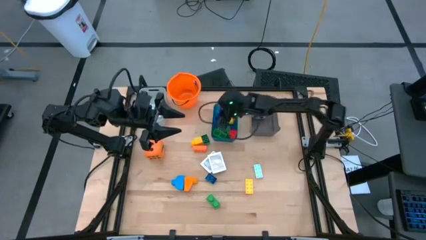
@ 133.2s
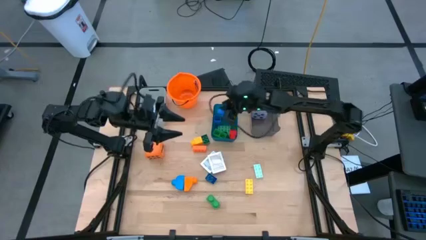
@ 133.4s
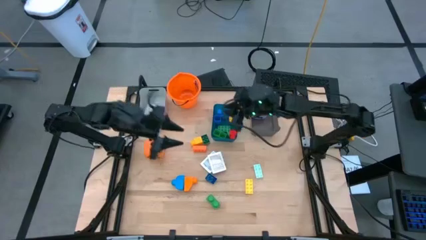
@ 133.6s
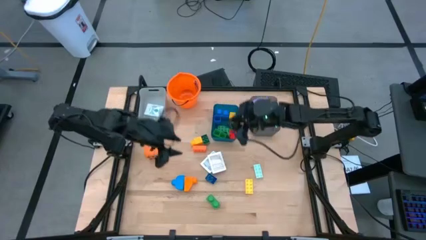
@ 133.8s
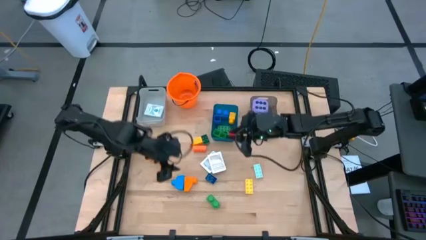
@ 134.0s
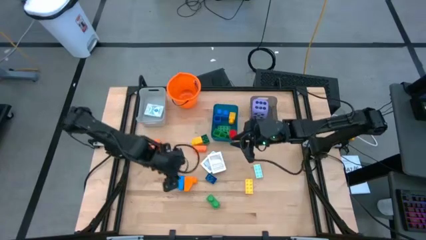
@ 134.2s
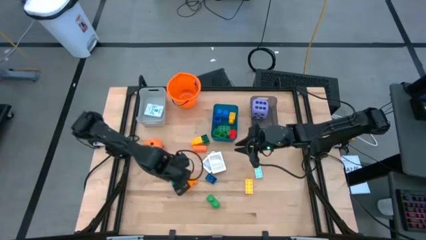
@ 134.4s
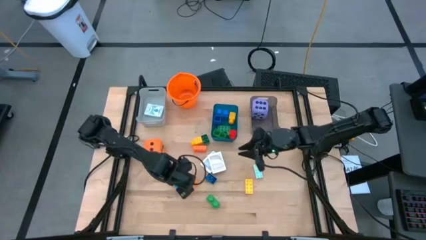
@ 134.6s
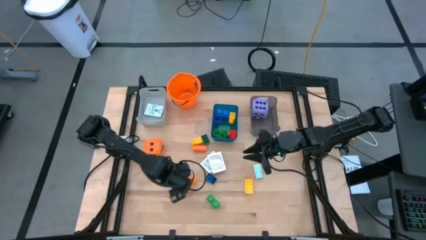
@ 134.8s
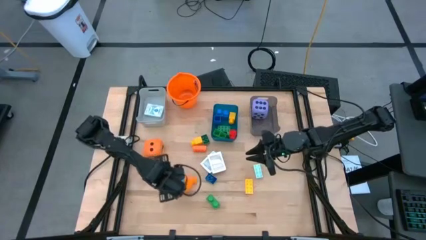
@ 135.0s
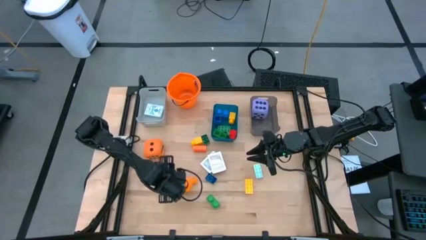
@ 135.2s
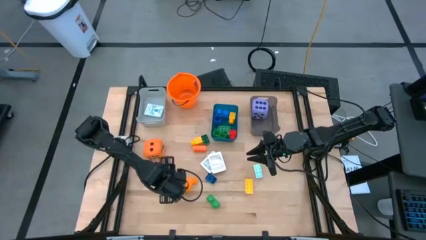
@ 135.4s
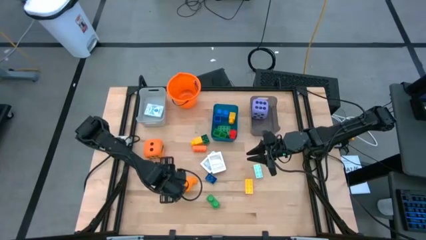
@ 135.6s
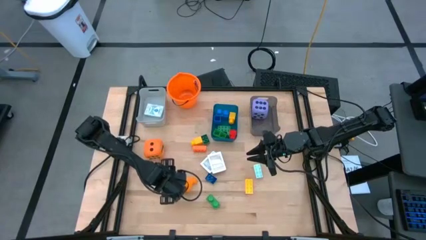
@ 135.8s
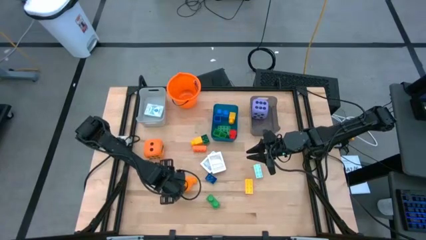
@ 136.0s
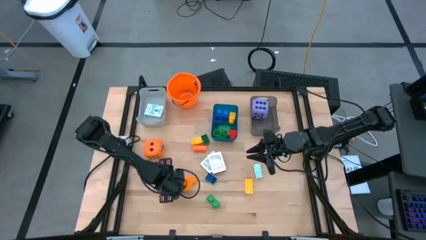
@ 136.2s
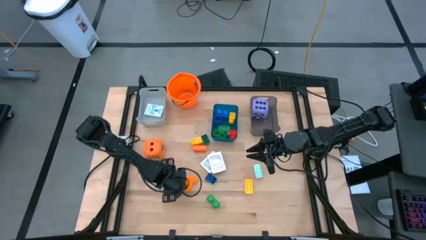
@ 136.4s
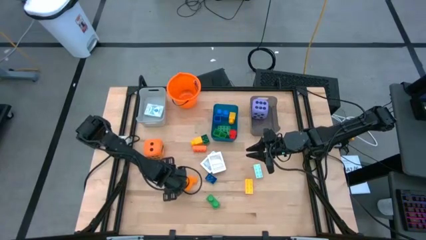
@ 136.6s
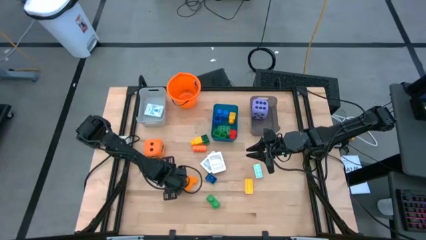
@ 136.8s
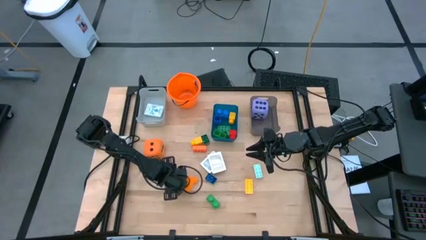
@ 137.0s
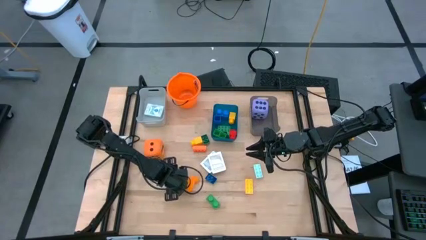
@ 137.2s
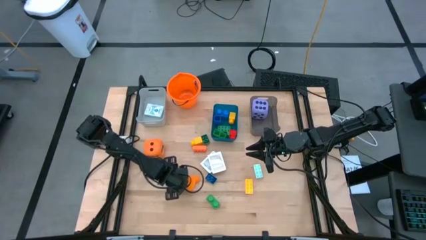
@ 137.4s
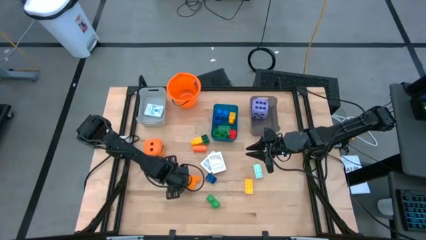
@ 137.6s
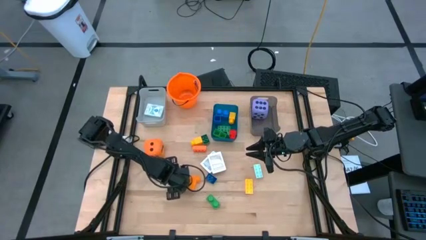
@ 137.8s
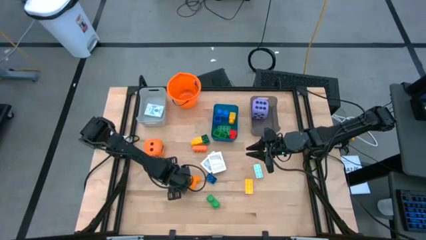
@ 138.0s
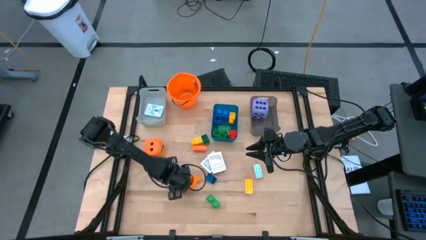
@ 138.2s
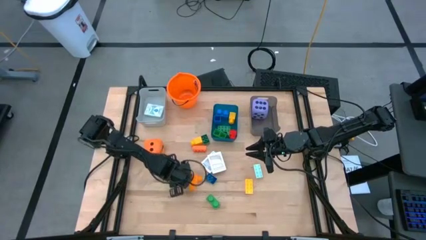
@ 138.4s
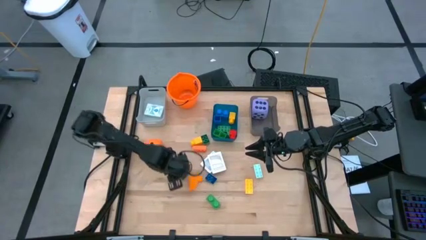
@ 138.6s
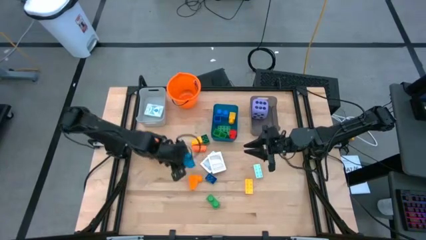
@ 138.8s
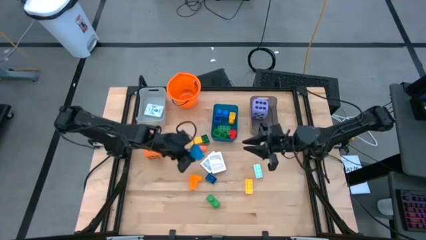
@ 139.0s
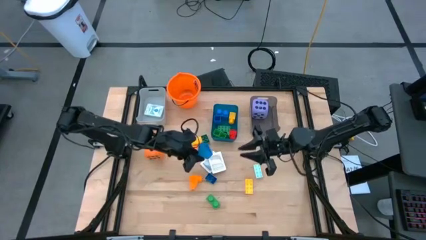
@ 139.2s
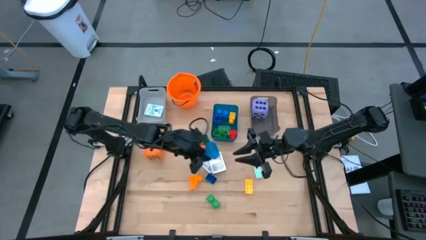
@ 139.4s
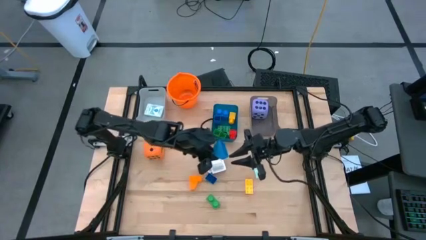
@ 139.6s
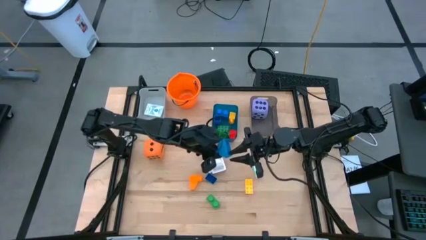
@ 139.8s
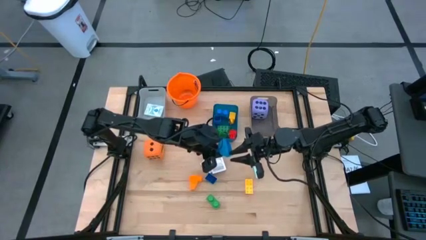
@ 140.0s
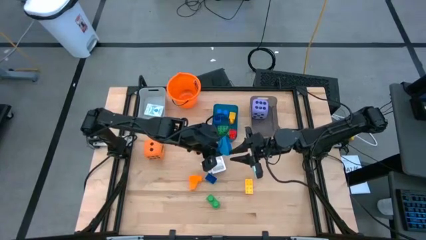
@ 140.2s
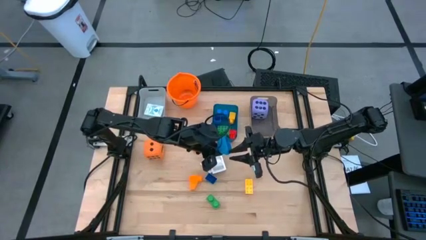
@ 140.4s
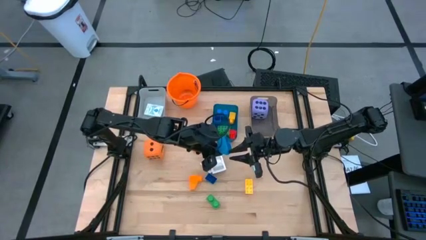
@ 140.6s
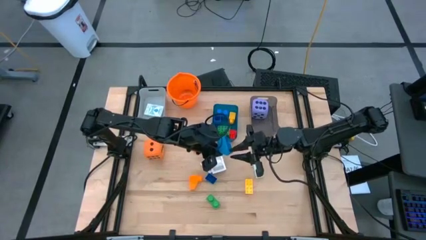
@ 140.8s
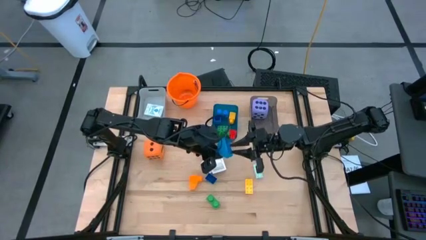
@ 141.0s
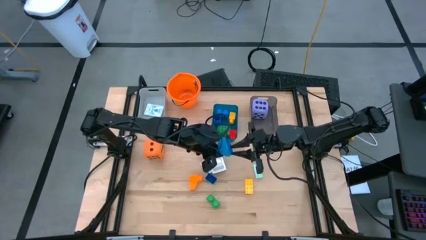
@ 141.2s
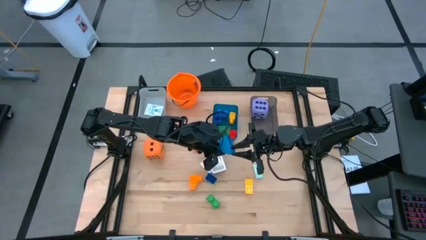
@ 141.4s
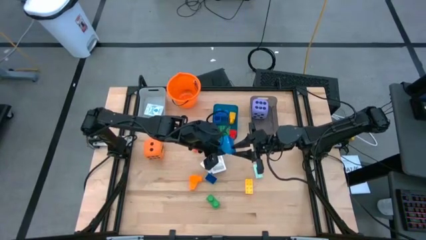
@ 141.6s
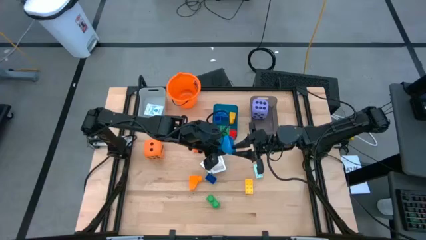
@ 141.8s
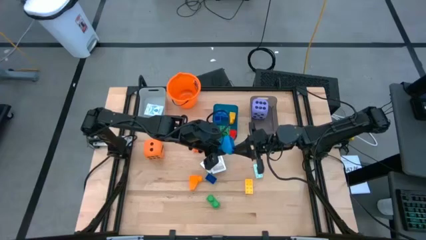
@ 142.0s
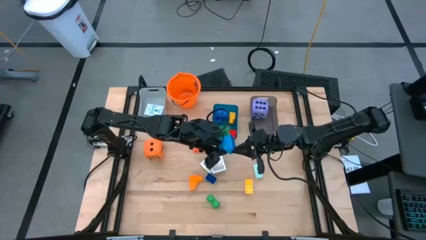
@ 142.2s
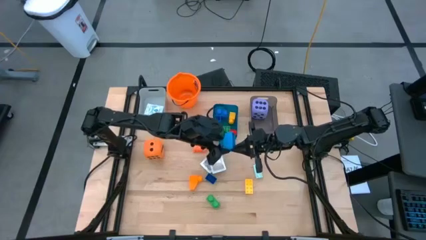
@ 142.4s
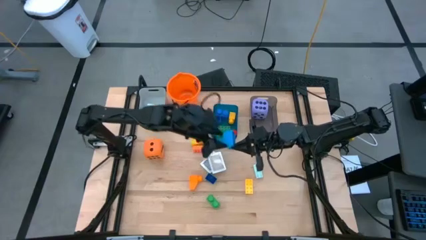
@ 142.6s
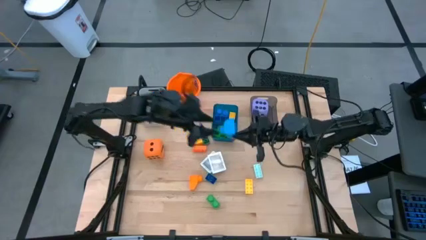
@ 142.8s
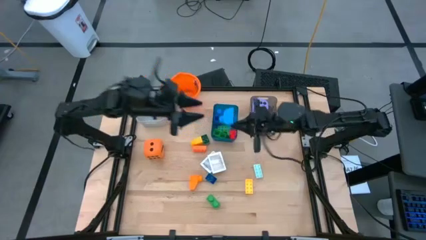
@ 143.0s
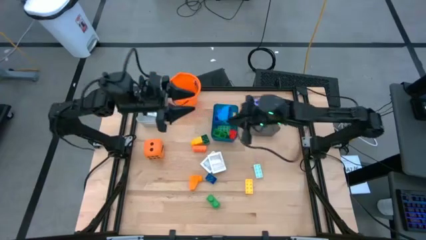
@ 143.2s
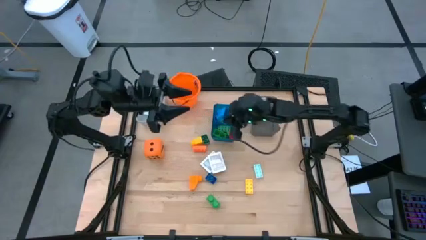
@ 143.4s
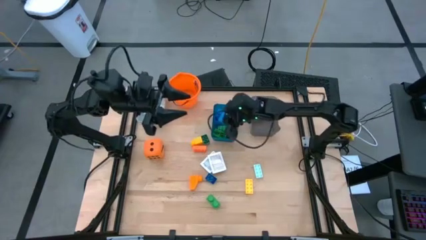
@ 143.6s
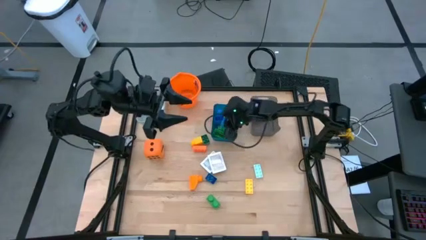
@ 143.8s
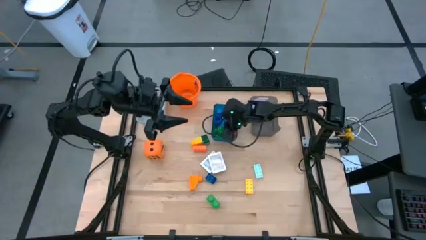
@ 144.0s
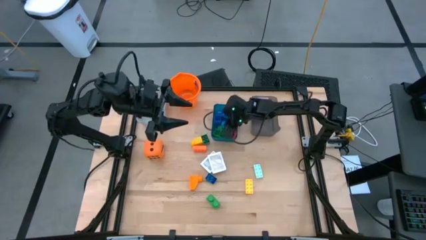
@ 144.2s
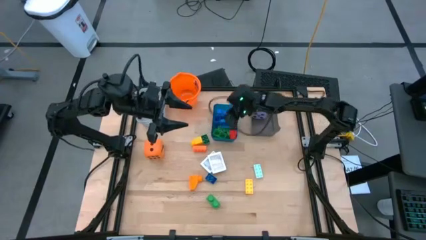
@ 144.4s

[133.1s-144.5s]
Task: Pick & Place Toys
Put the blue game piece into the blue bin

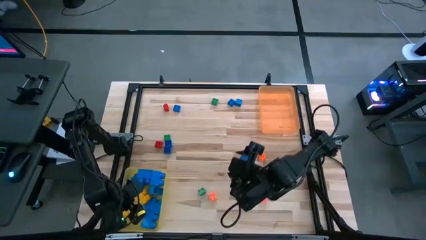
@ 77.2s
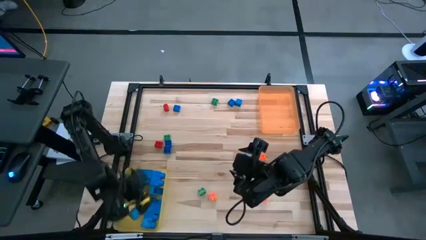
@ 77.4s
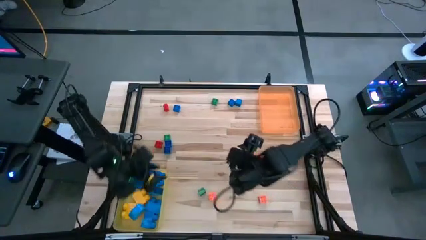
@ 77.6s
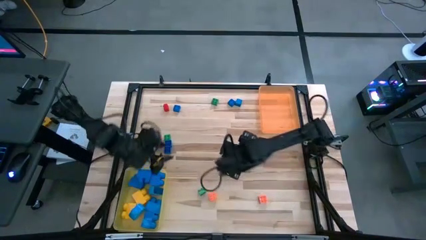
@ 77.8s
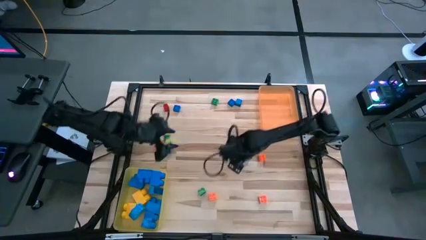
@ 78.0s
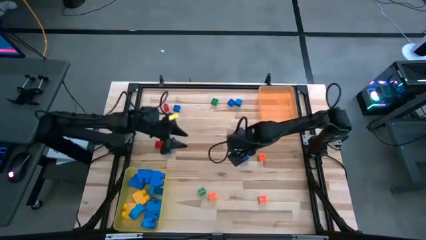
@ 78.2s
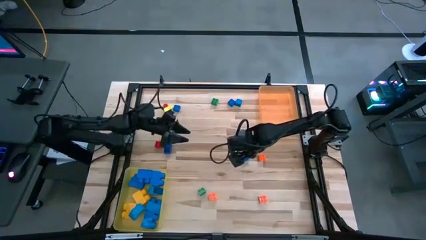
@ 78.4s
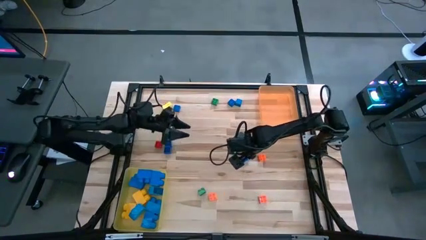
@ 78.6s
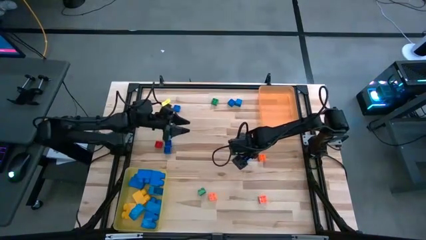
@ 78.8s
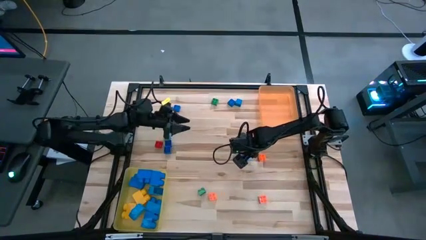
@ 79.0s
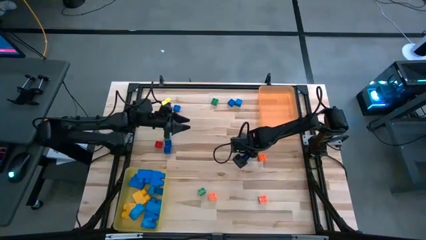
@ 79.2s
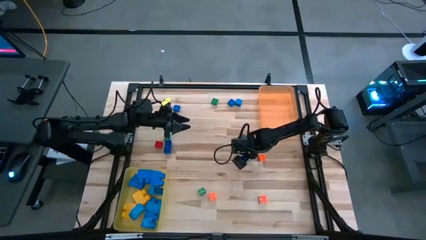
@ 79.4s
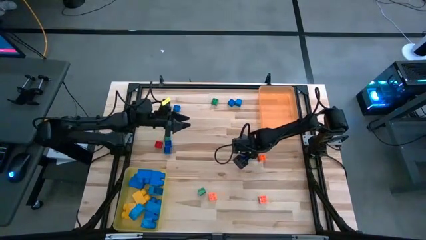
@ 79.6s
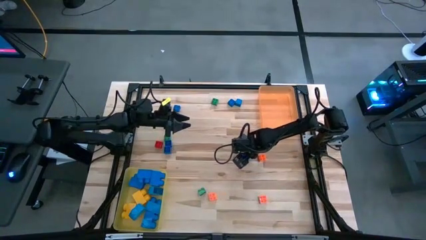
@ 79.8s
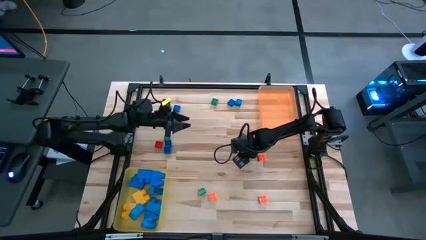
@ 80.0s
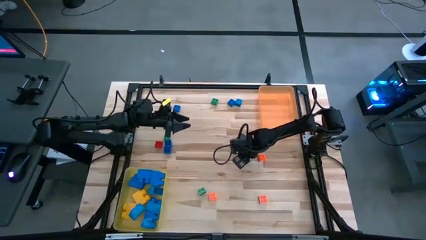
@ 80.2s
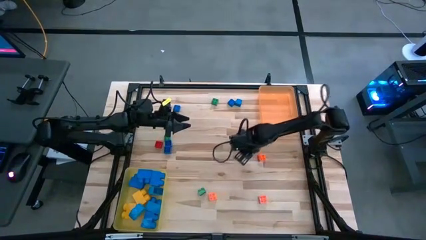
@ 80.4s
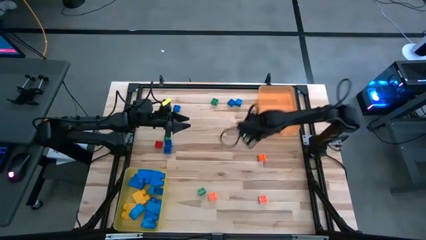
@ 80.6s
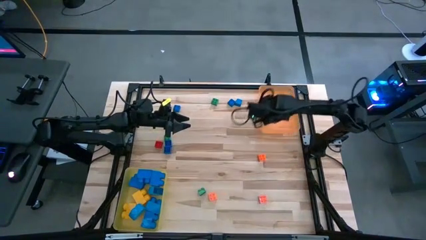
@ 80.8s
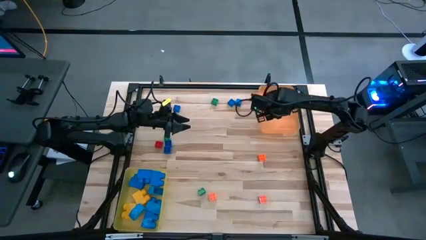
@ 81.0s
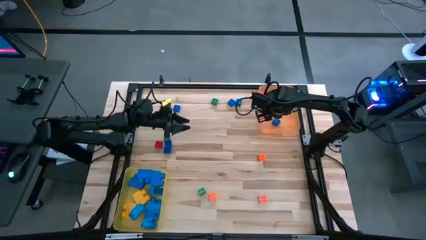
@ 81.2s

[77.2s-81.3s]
Task: Sort blocks by size
Put the small blue game piece into the orange bin

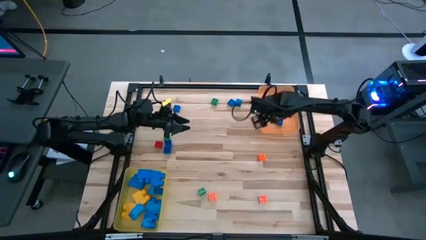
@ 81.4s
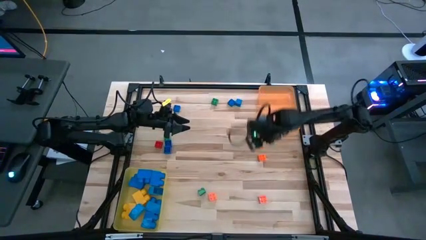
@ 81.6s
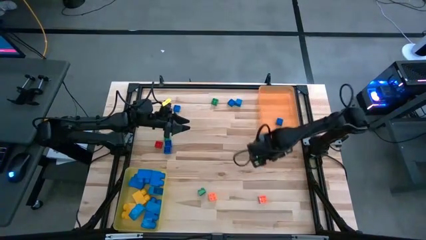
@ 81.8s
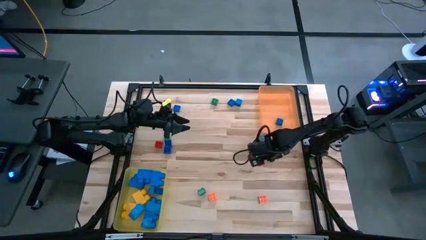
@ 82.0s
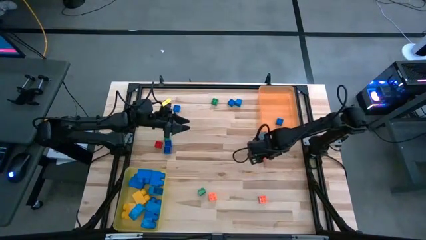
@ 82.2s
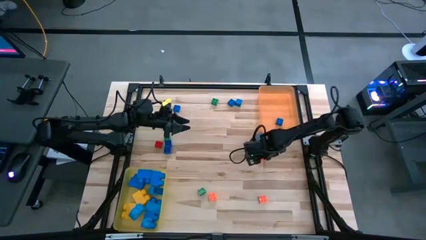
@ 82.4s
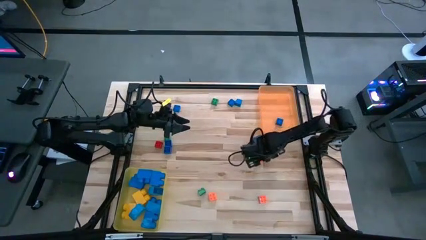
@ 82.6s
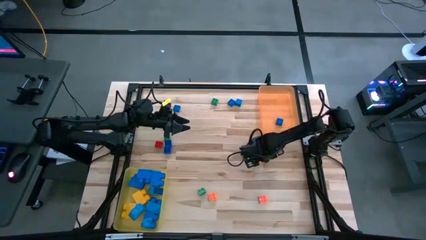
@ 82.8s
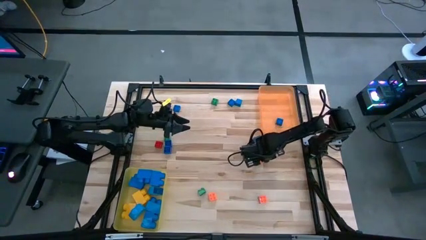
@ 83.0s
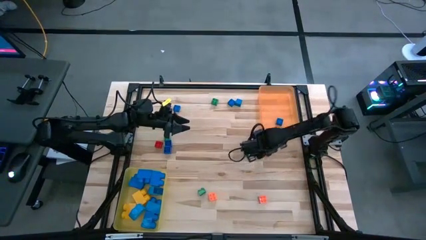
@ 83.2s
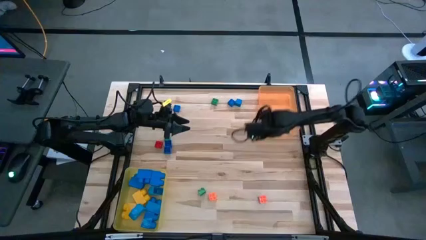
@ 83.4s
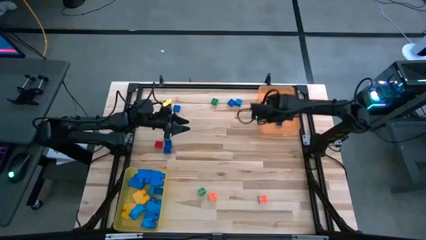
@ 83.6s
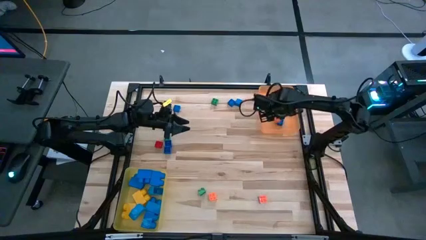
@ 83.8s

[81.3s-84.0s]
Put the small orange game piece into the orange bin
